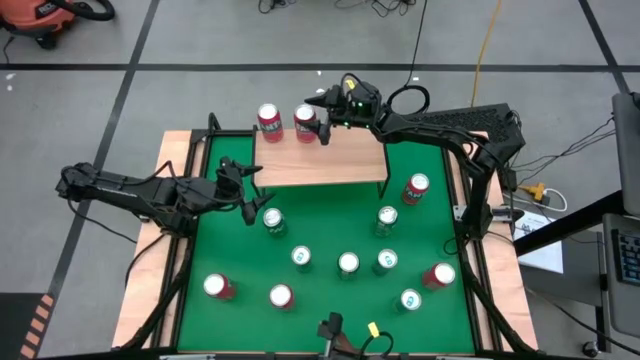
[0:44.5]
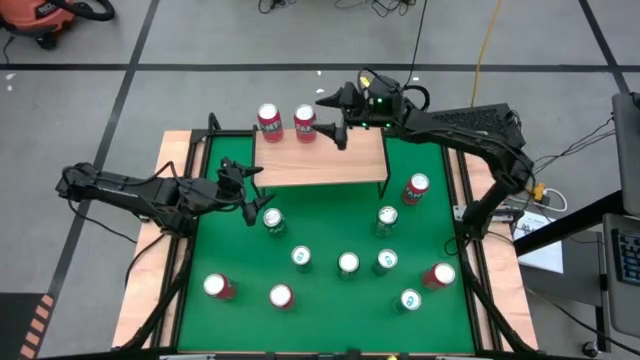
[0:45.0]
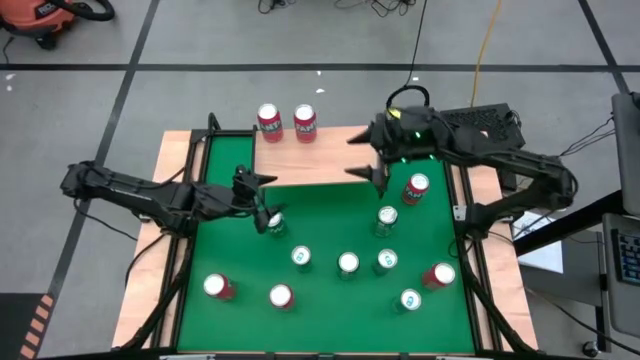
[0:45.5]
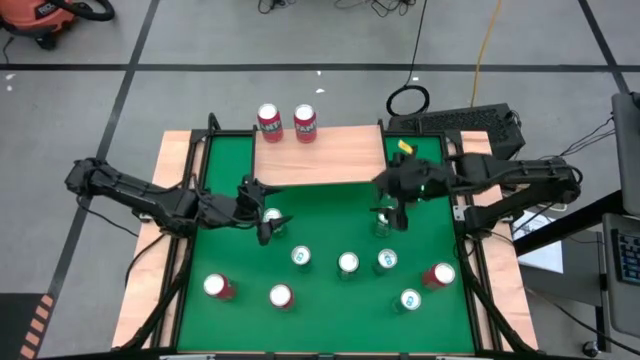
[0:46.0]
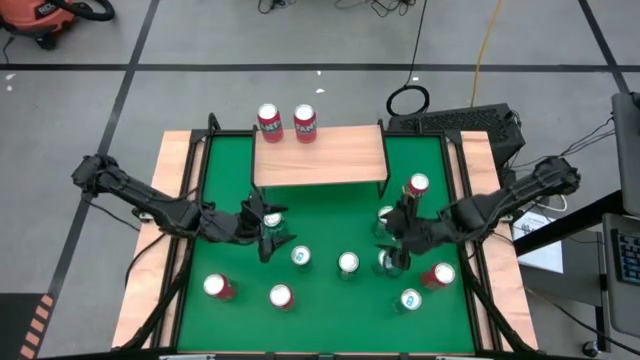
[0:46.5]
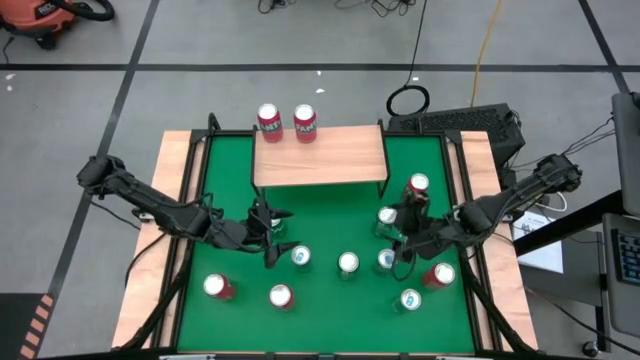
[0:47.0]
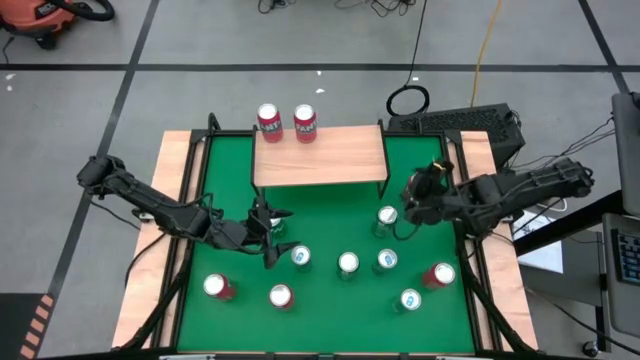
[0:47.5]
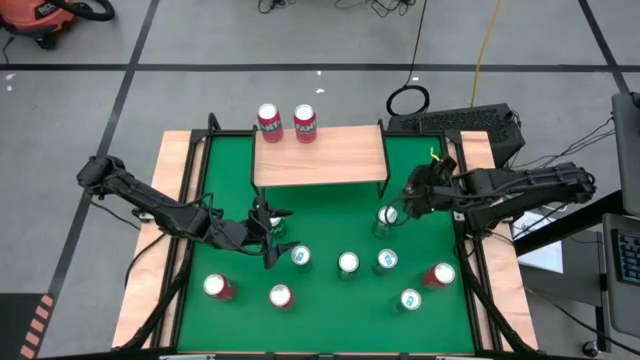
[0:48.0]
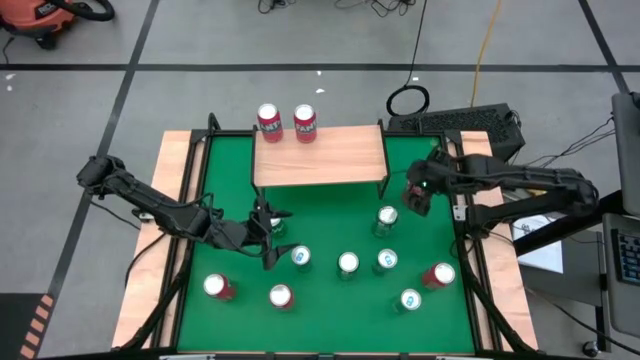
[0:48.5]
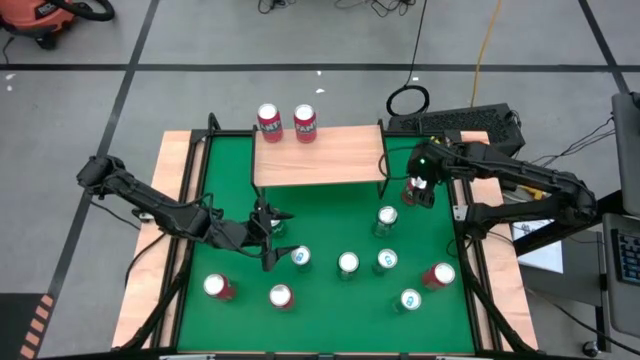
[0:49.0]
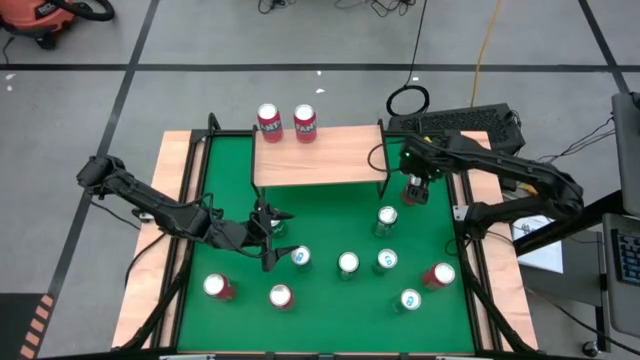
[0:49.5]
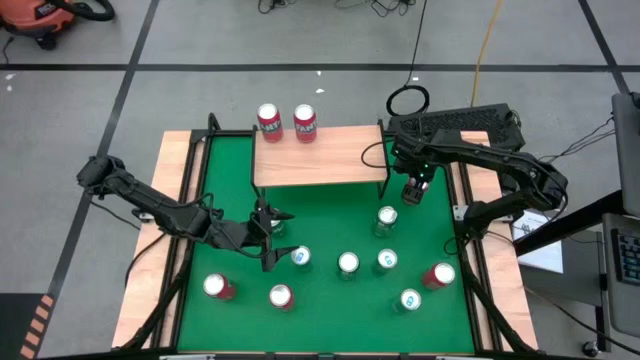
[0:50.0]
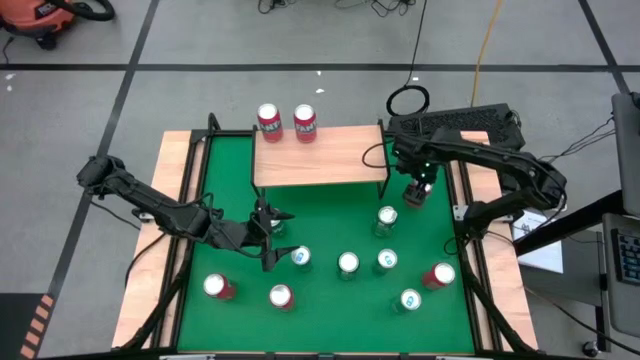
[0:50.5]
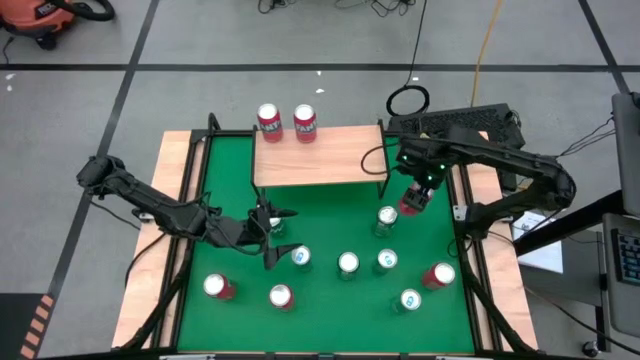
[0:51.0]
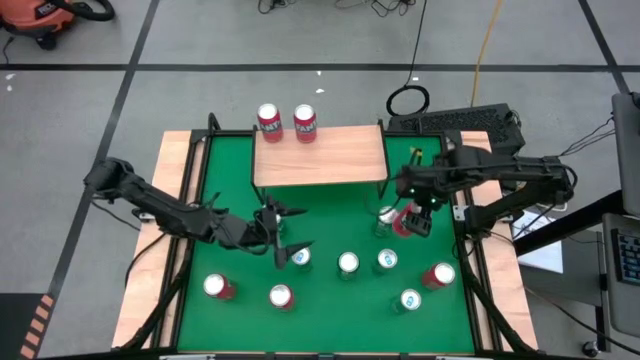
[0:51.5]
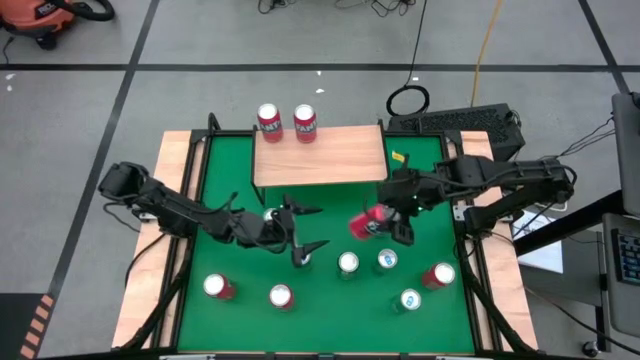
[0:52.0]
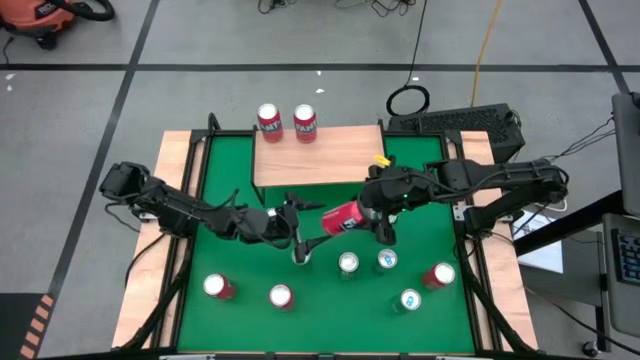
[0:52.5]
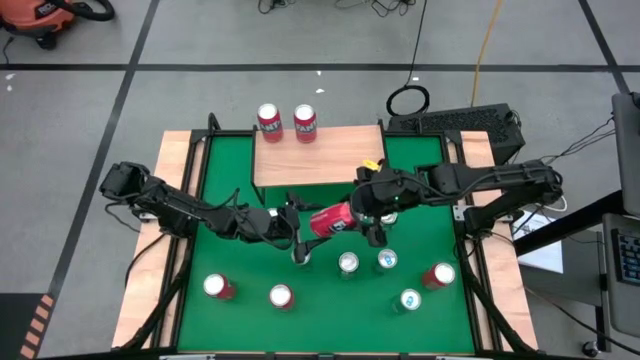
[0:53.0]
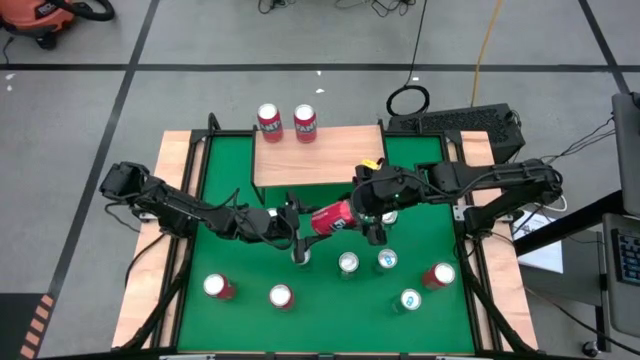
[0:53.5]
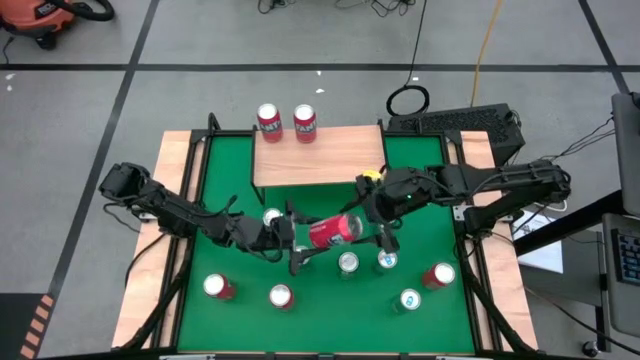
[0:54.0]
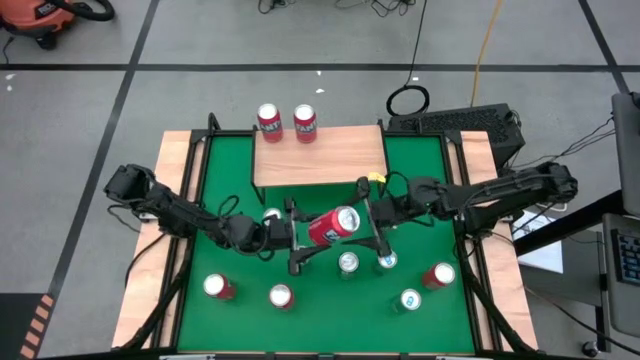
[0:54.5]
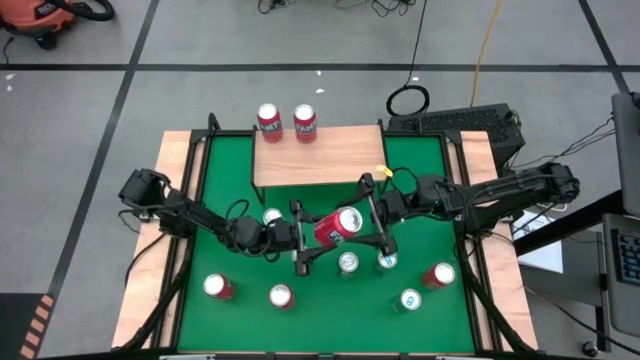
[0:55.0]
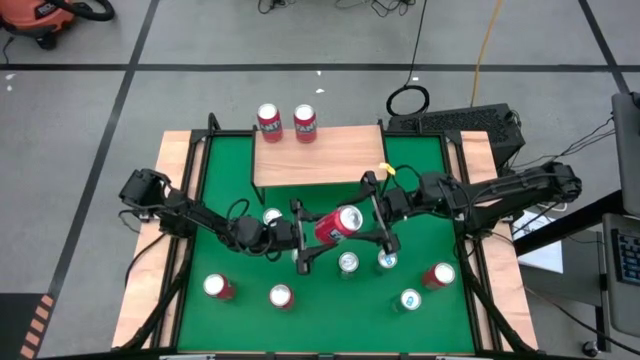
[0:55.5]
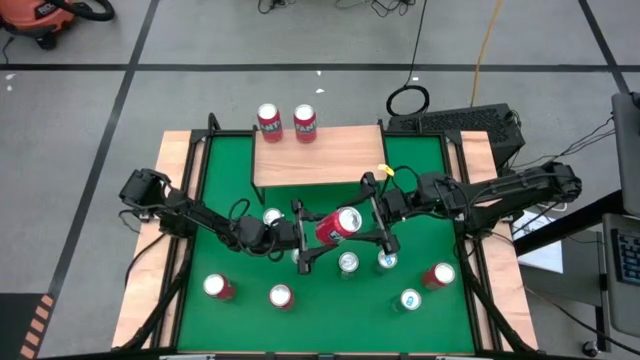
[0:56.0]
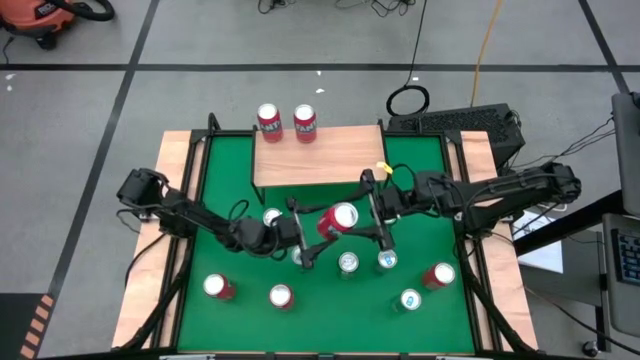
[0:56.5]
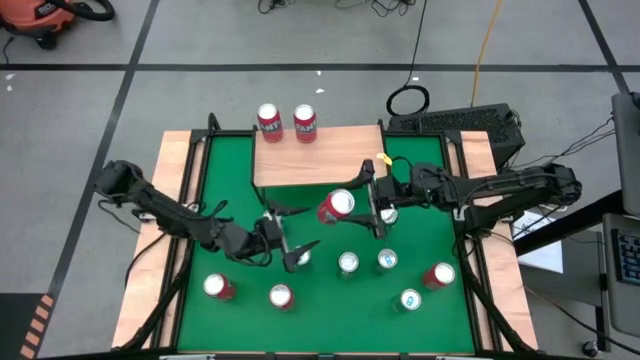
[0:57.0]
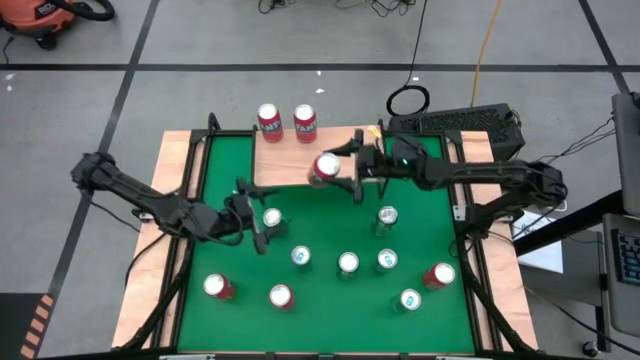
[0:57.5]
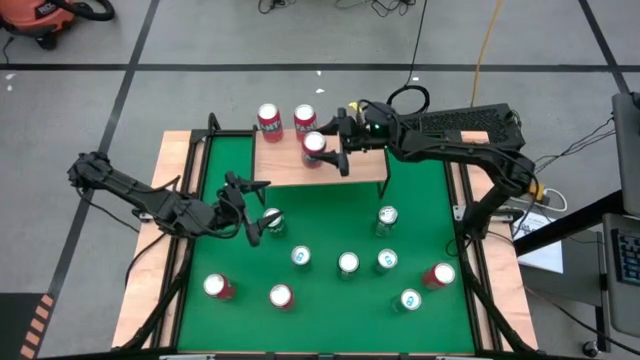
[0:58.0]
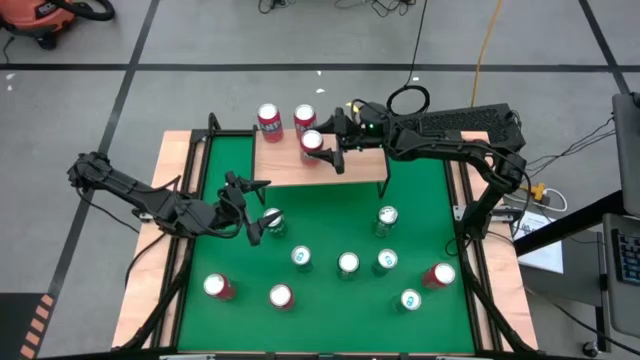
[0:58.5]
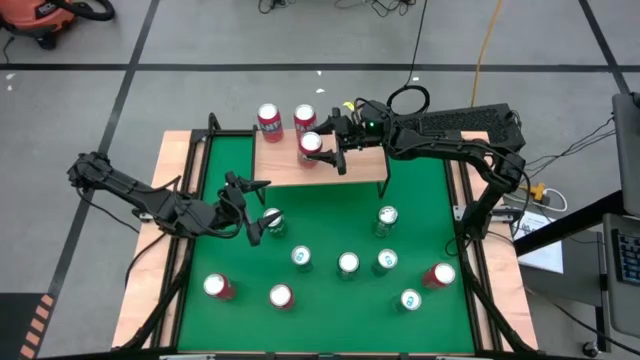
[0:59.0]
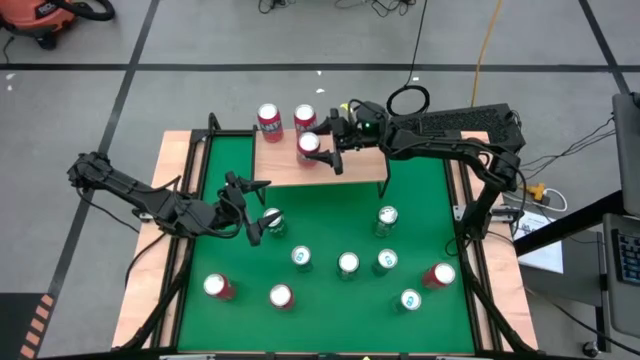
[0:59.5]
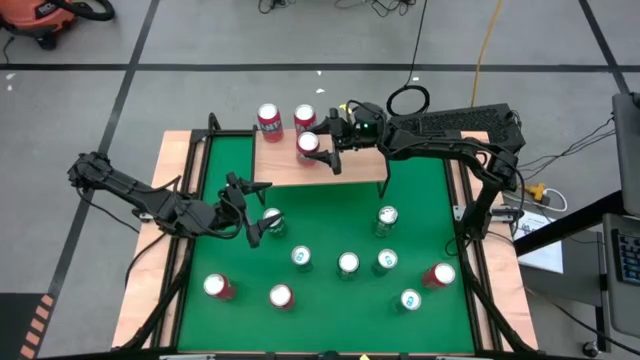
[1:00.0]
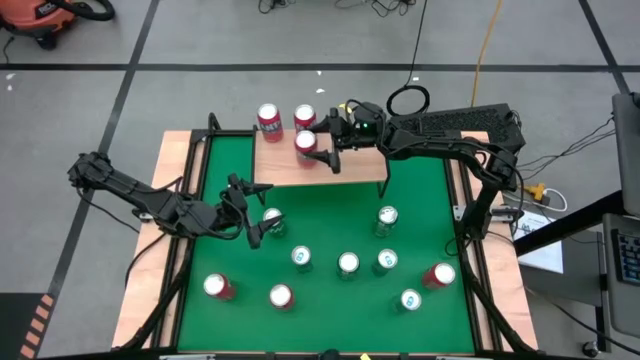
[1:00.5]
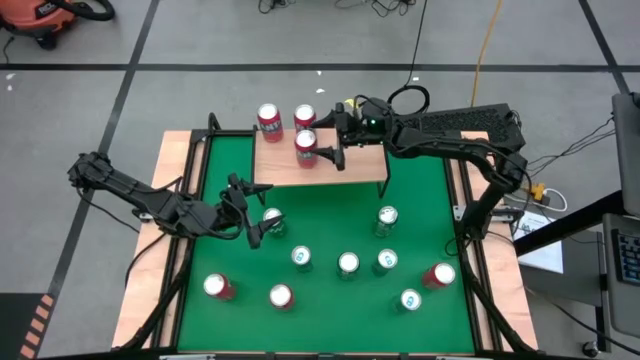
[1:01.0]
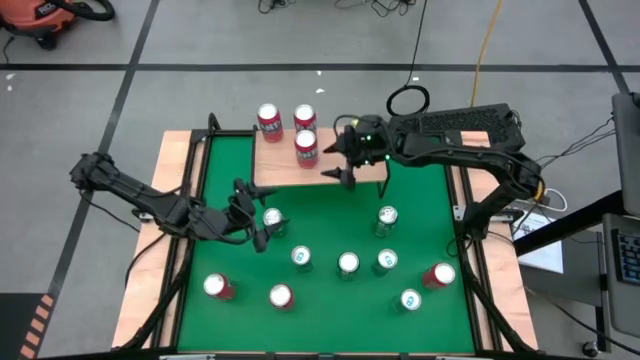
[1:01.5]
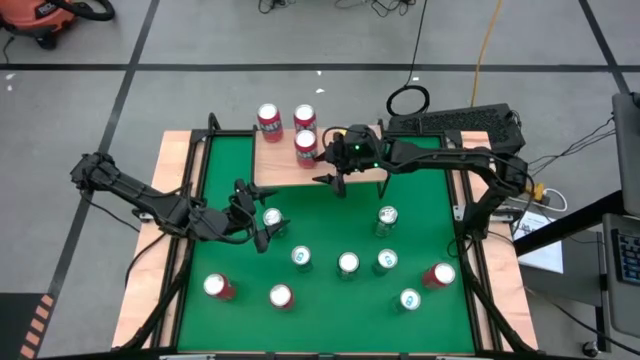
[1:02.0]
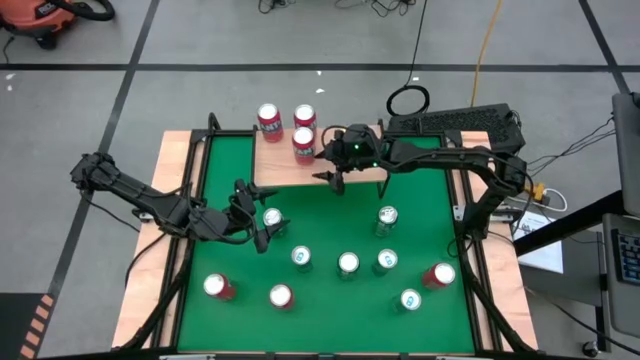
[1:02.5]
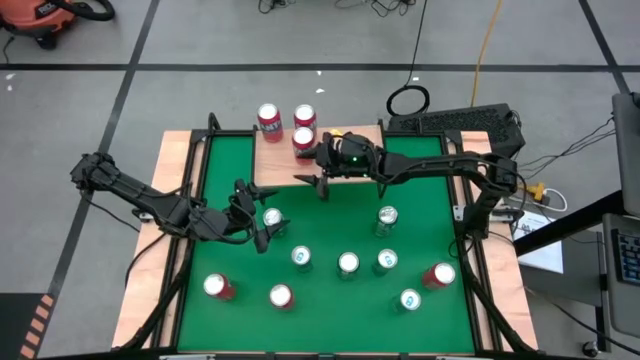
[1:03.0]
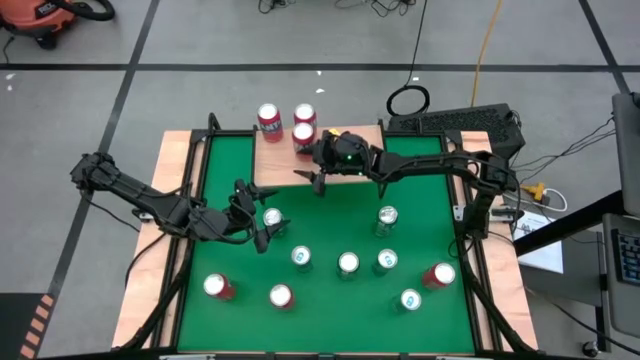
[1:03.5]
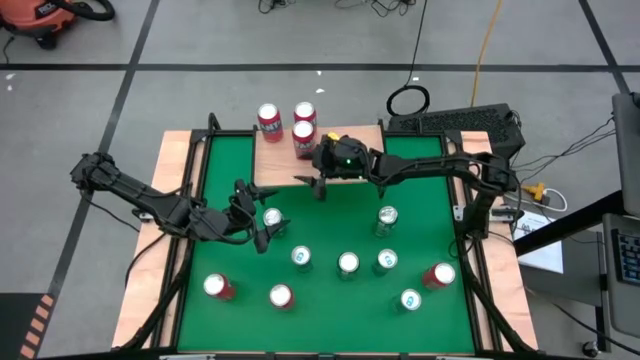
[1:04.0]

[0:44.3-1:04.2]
Task: Place canned beverage on shelf
Put the red soda can on the shelf aligned with the other red soda can

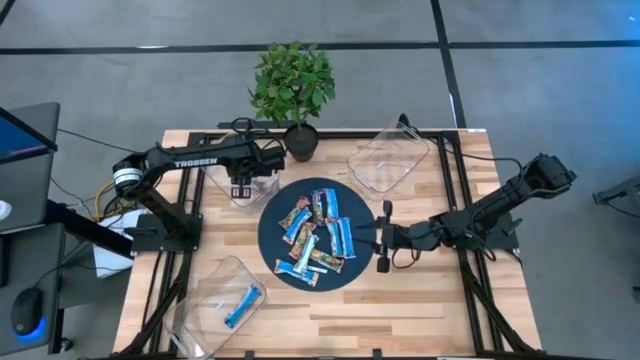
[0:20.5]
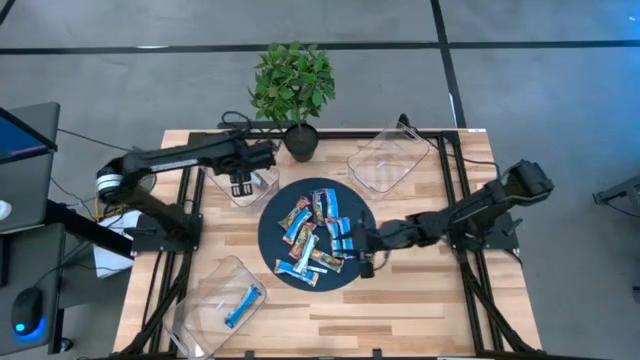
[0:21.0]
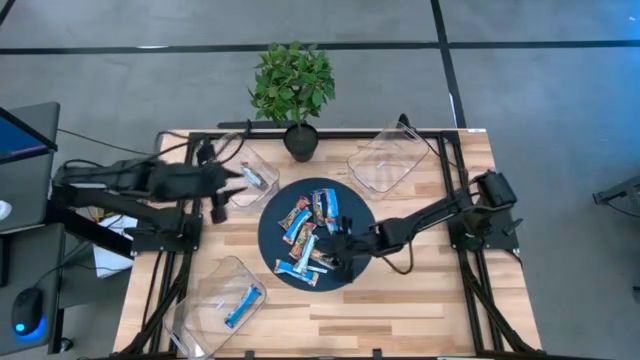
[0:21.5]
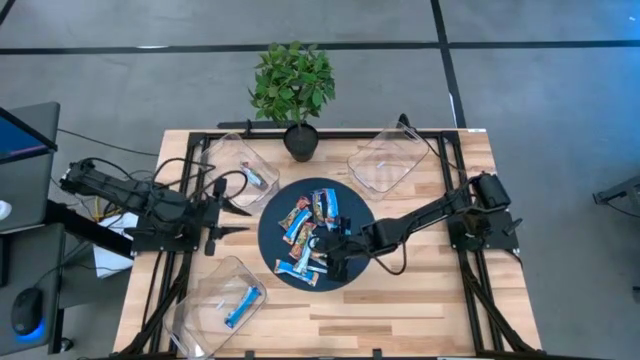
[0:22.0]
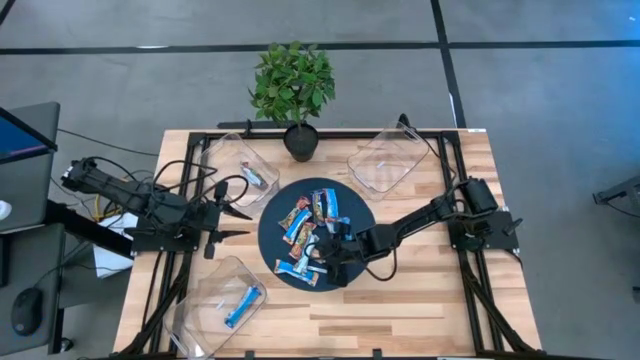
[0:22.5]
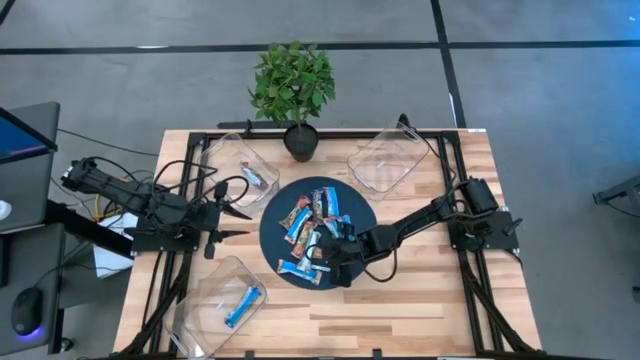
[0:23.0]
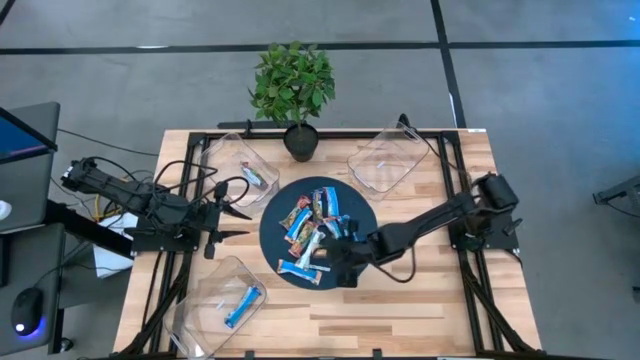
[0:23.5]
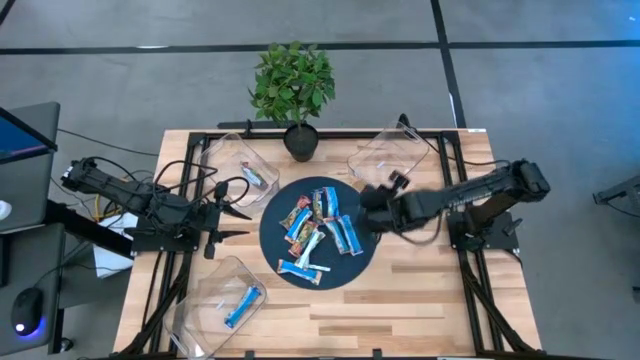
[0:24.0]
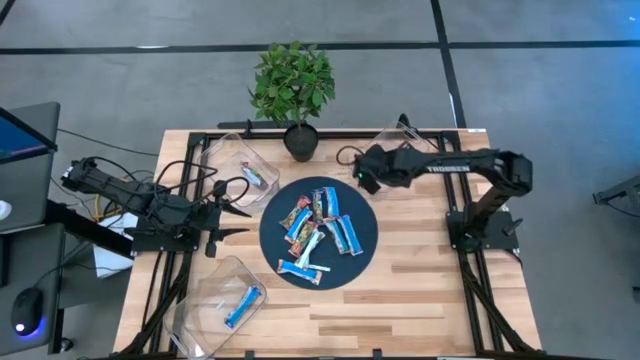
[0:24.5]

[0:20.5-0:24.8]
Task: Pick and place Granola Bars by type
Put the yellow granola bar into the top right bin
